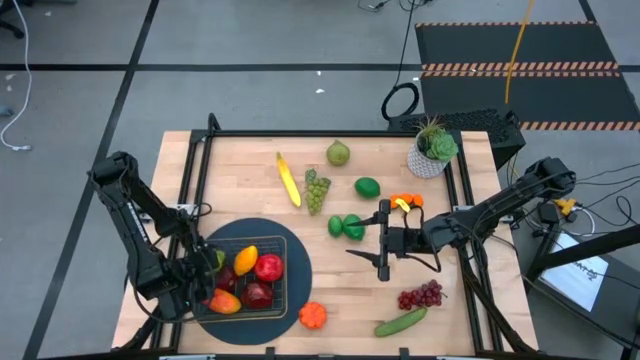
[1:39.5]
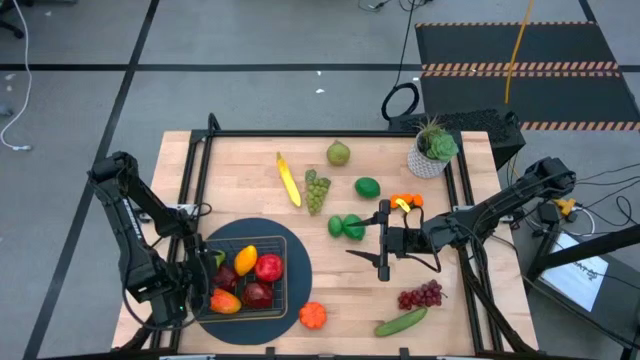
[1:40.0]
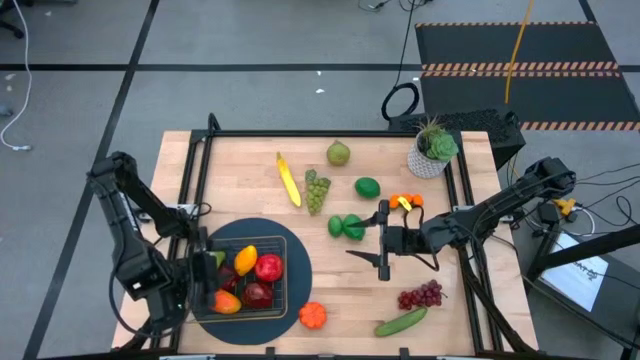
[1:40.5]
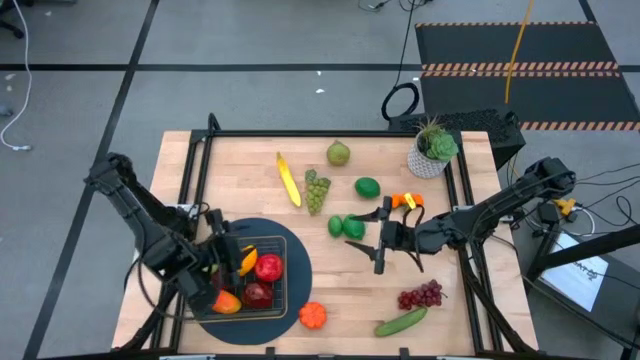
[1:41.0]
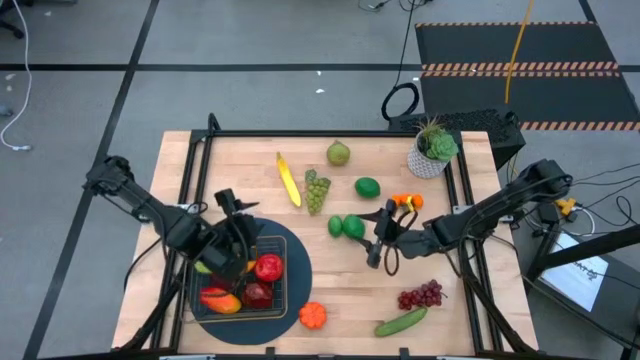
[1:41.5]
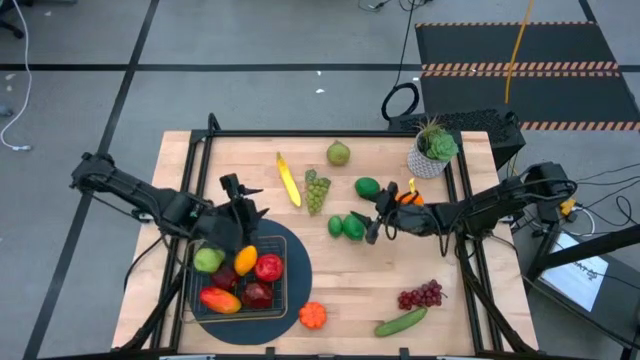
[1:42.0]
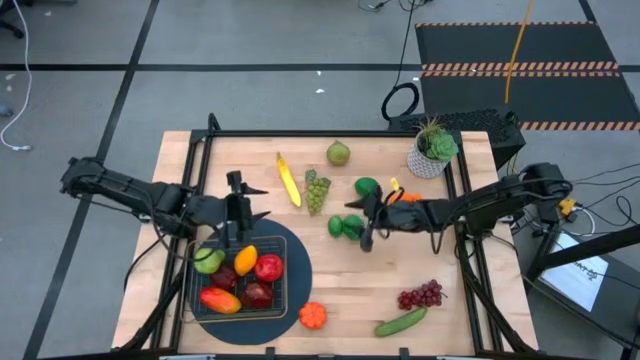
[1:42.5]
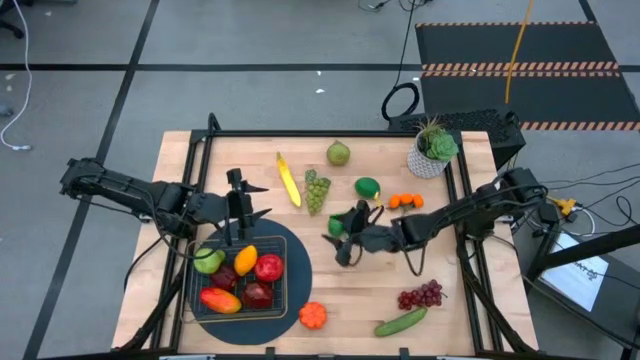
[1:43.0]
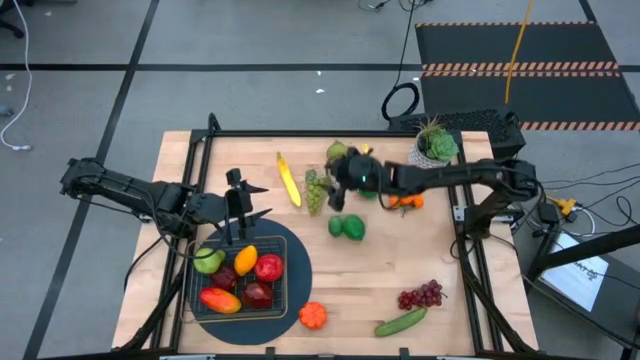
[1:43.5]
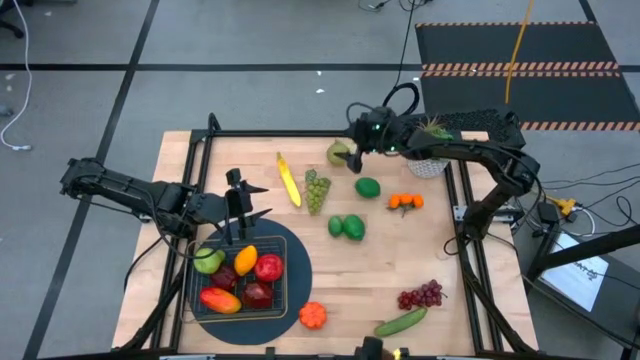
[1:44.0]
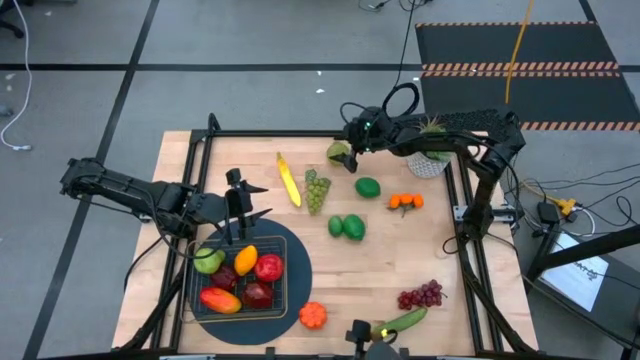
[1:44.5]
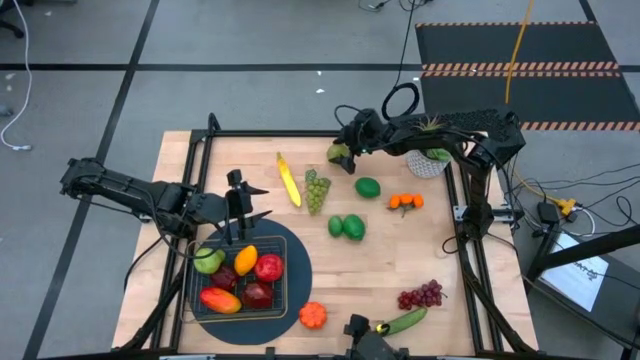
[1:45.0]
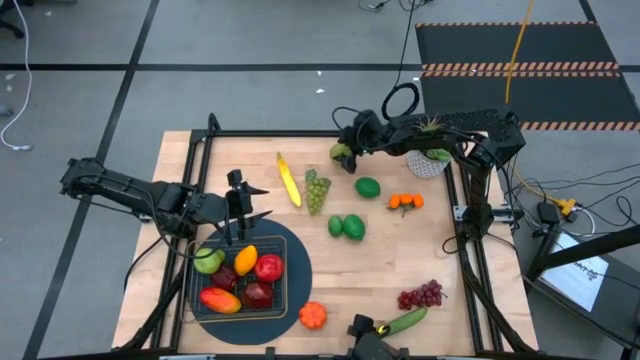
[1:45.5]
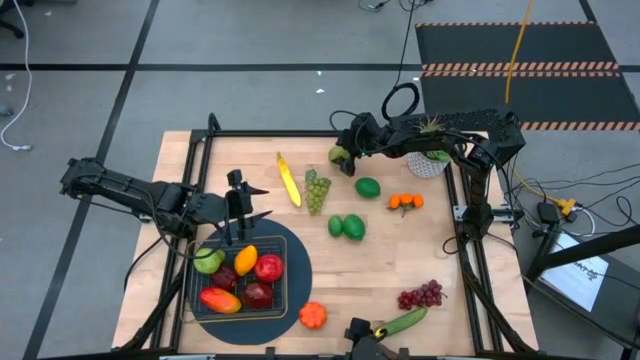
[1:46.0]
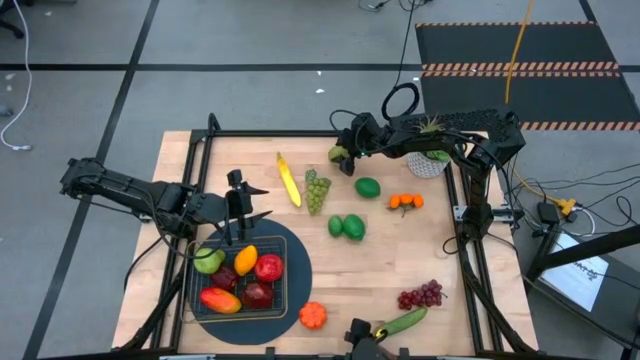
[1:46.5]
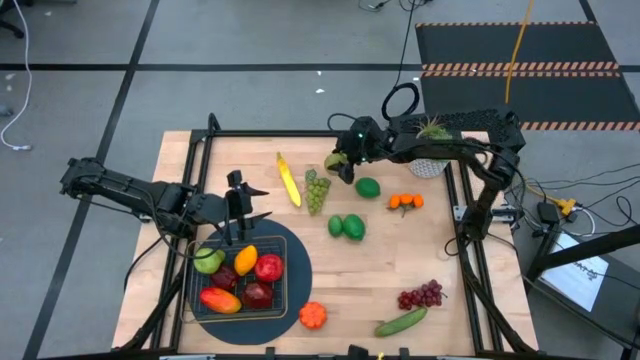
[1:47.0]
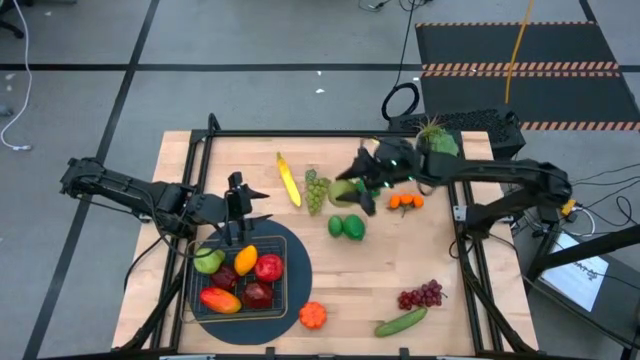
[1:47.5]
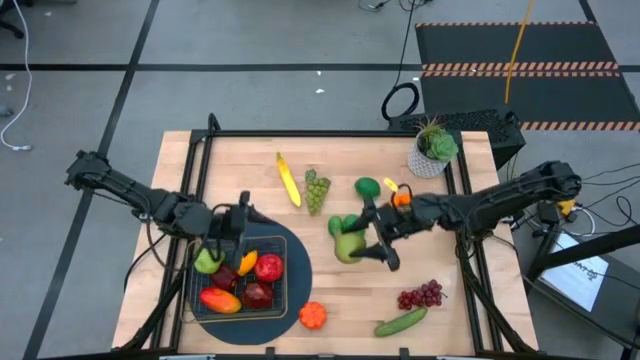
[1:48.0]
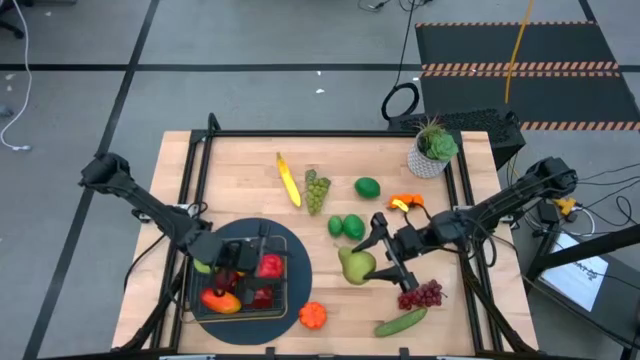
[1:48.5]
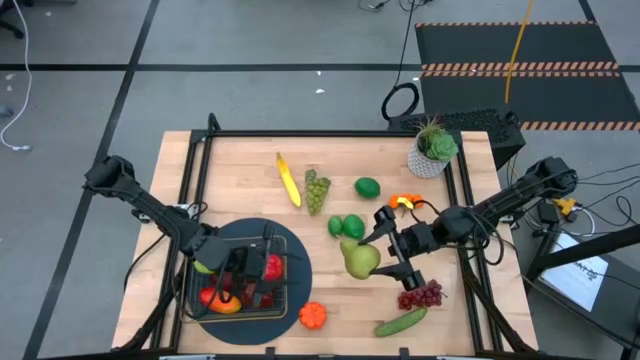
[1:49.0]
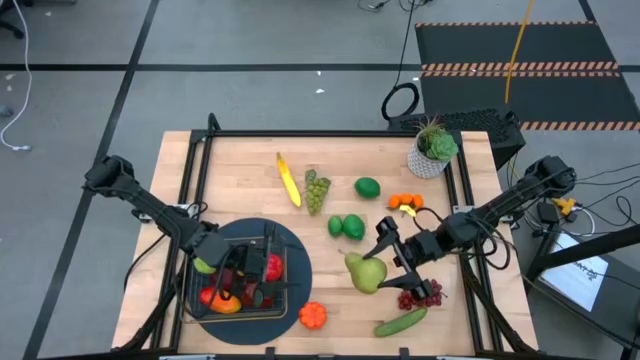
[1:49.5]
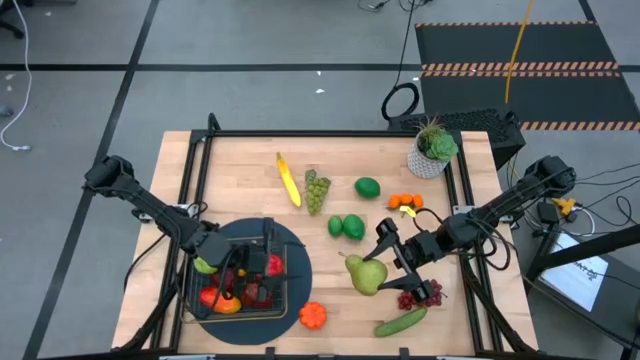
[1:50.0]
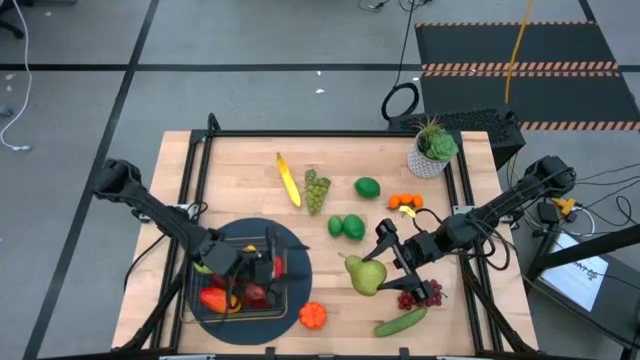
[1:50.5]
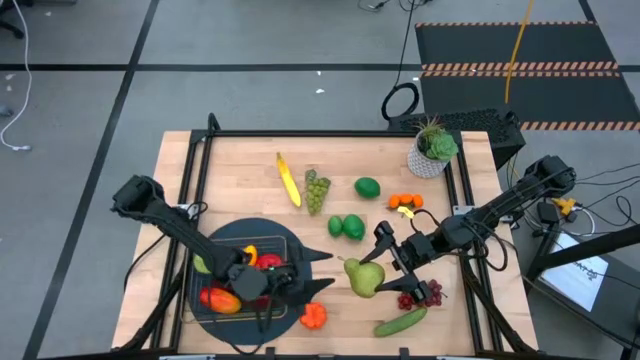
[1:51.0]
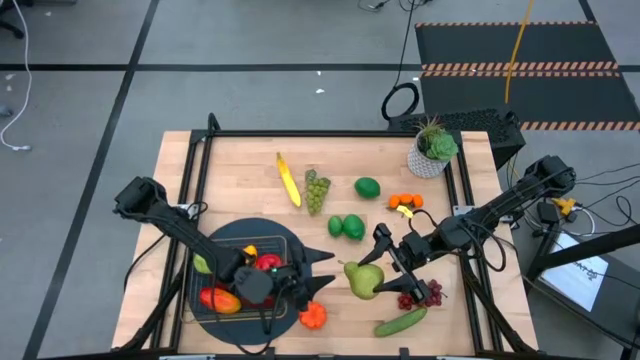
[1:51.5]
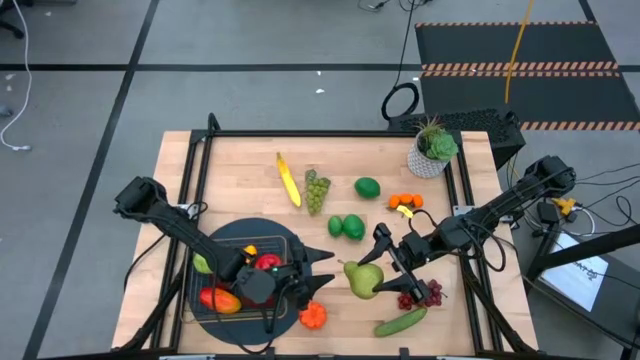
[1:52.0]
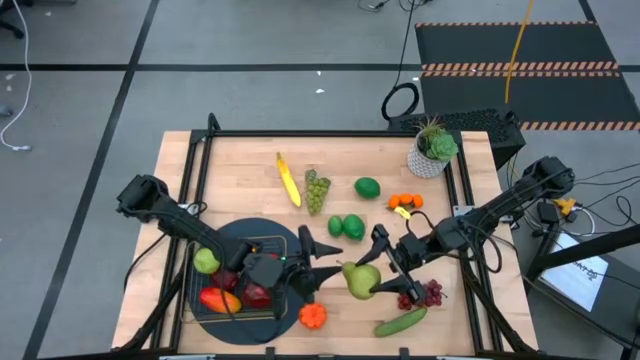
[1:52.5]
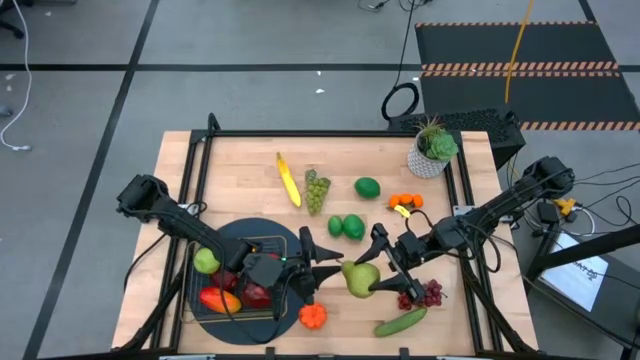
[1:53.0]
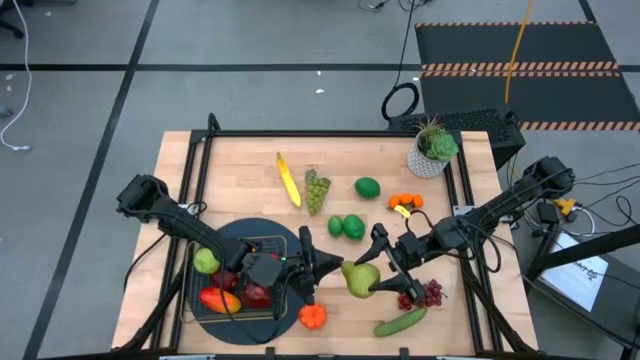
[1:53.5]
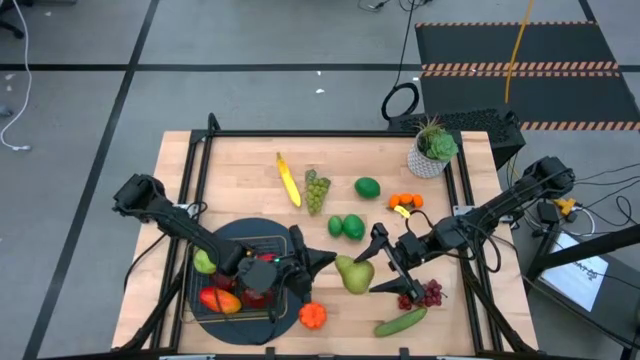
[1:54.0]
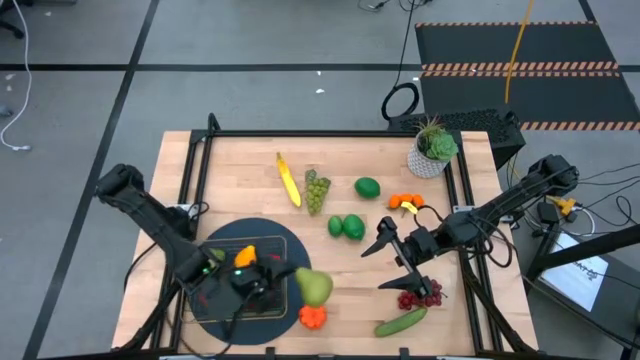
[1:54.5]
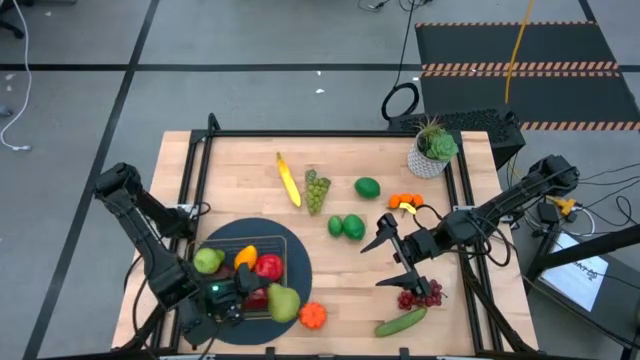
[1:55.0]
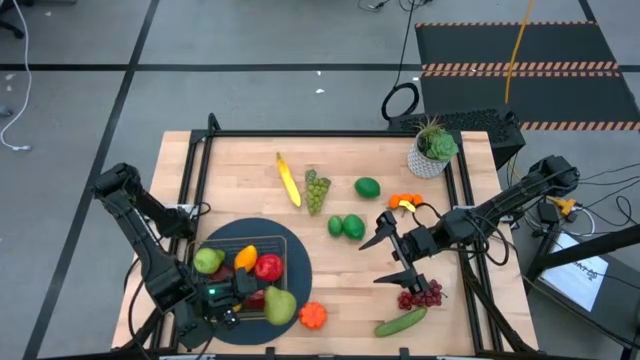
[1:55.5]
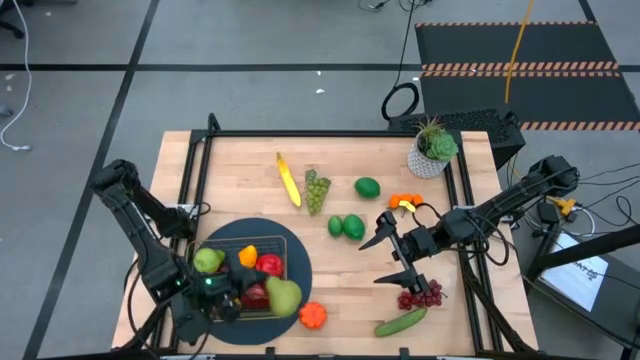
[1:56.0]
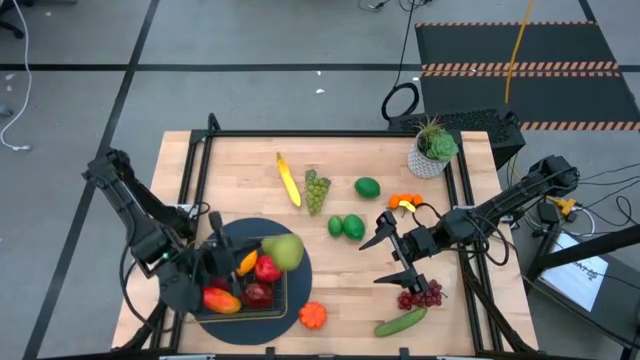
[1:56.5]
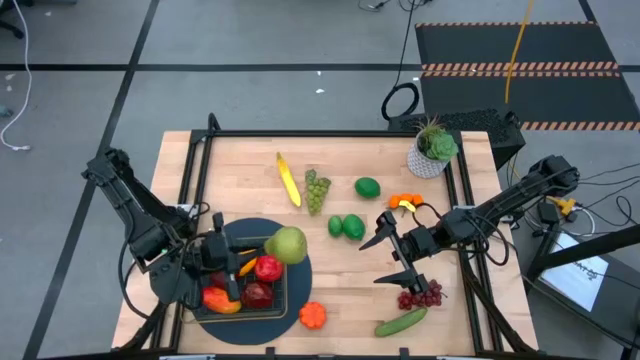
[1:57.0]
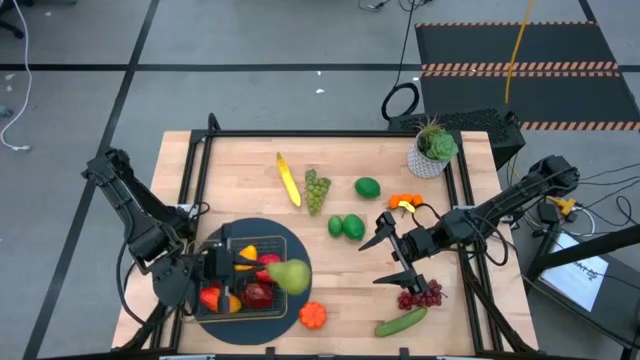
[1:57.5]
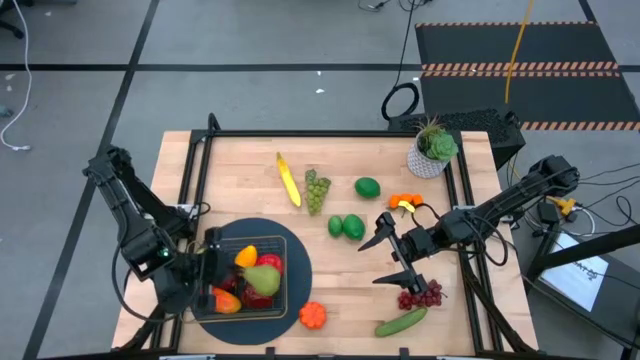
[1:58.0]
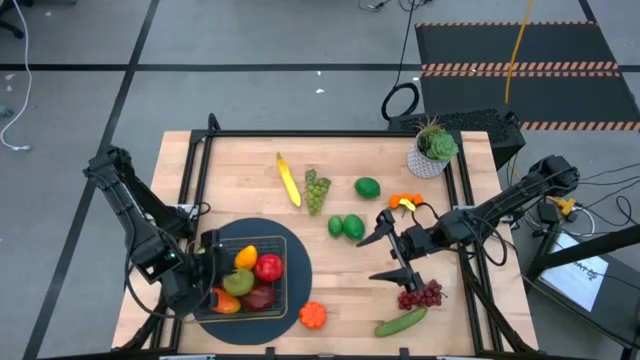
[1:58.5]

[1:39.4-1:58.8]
Task: Build produce basket
Put the pear into the gold wire basket
